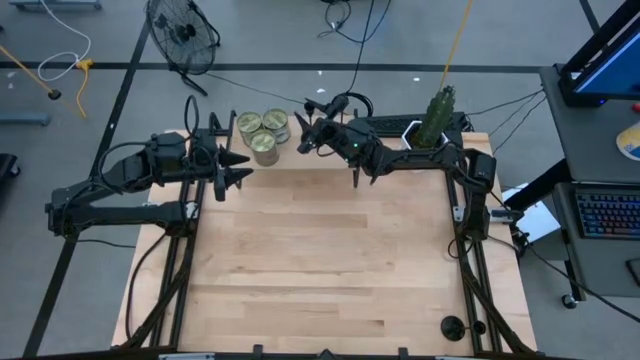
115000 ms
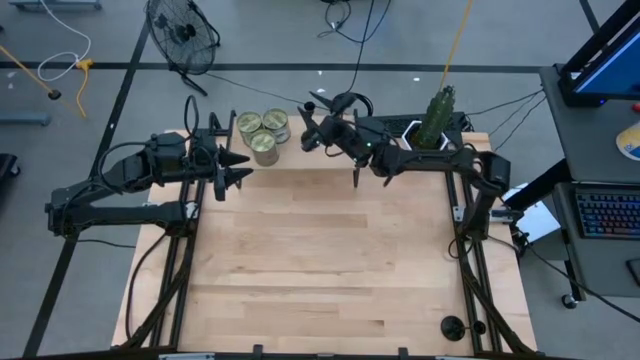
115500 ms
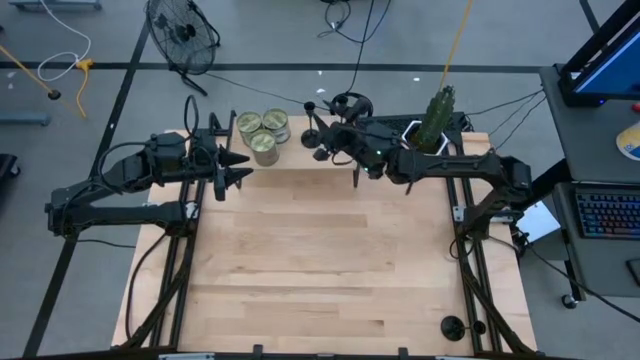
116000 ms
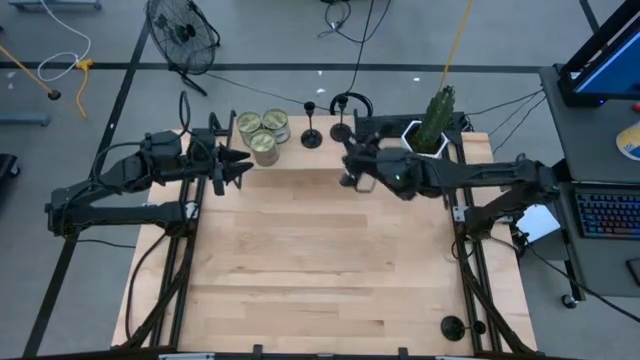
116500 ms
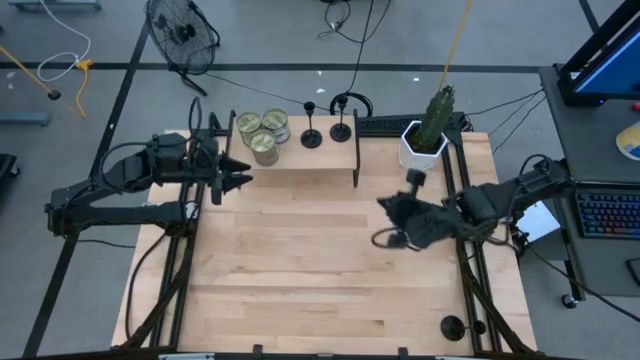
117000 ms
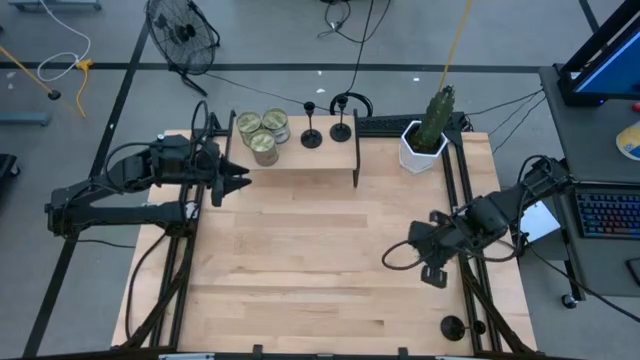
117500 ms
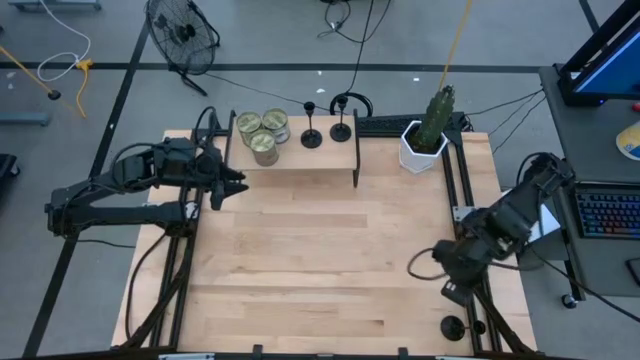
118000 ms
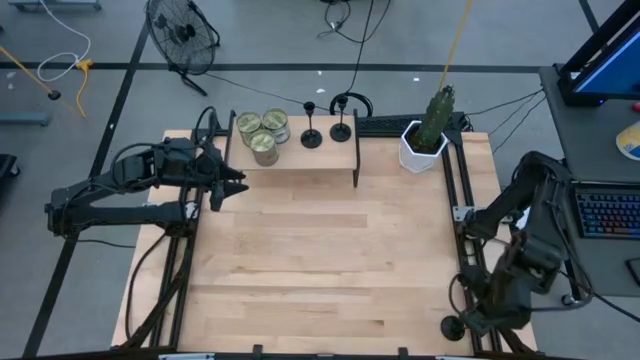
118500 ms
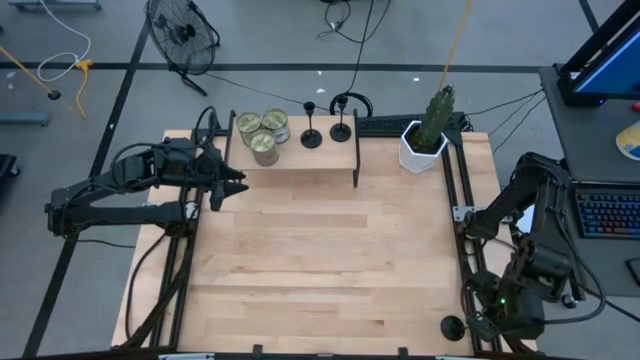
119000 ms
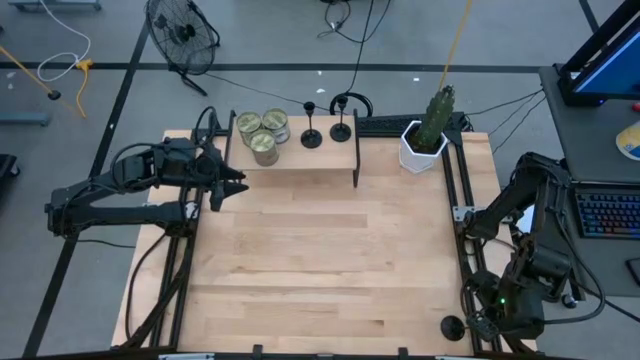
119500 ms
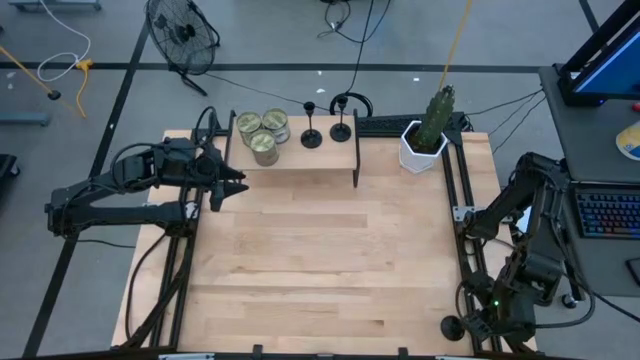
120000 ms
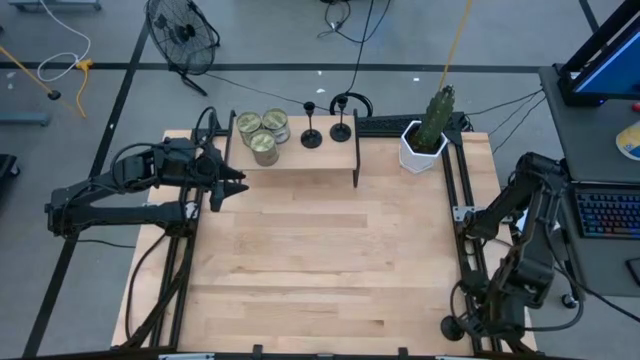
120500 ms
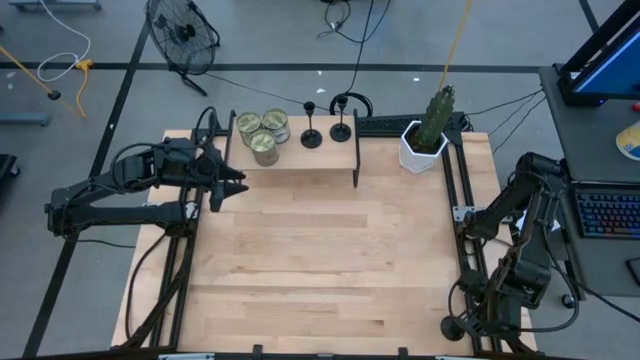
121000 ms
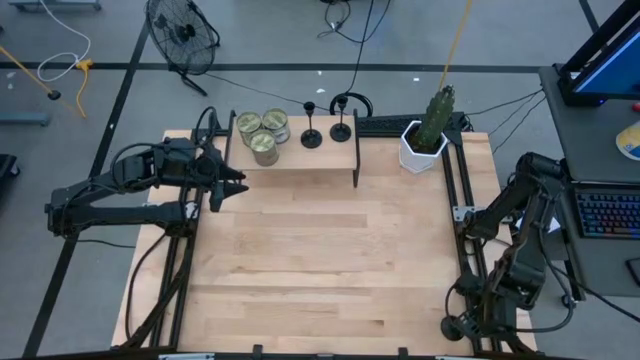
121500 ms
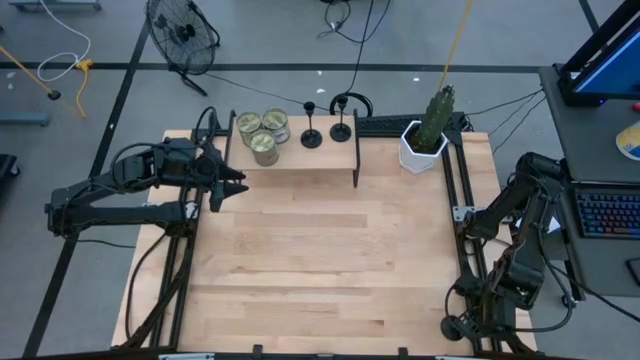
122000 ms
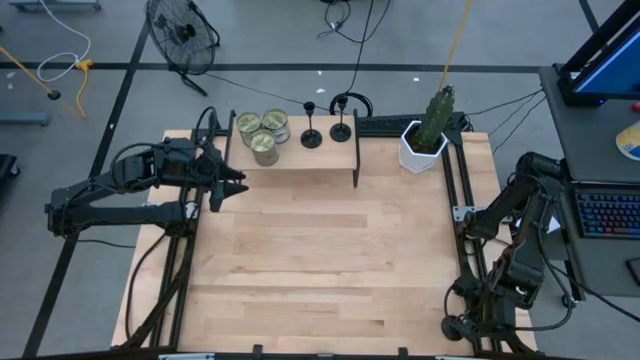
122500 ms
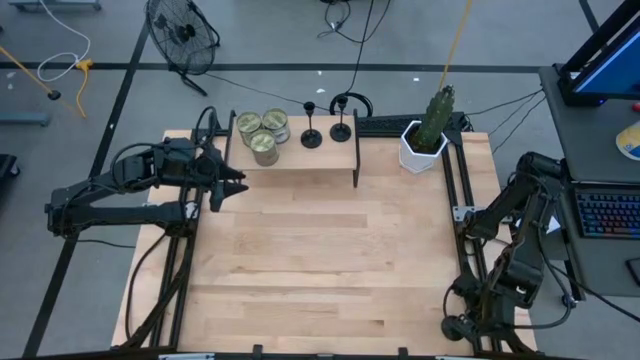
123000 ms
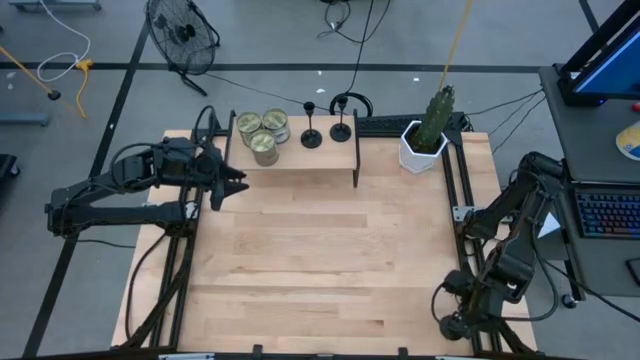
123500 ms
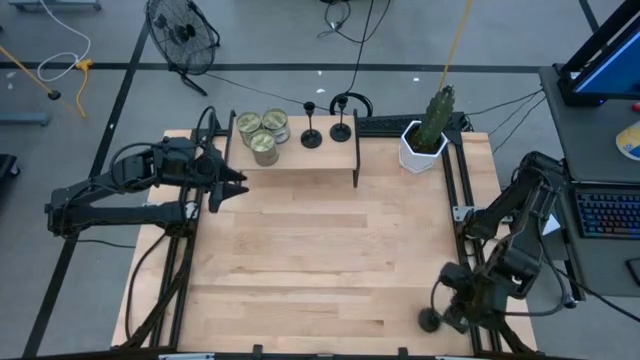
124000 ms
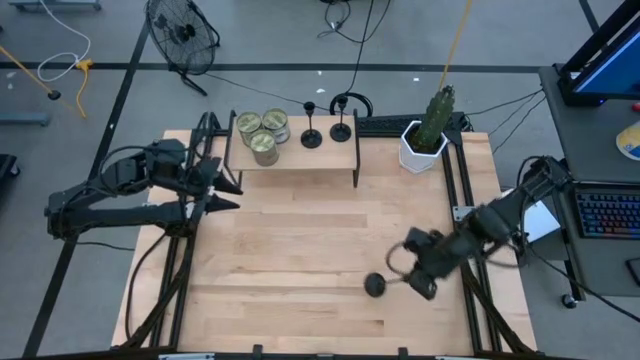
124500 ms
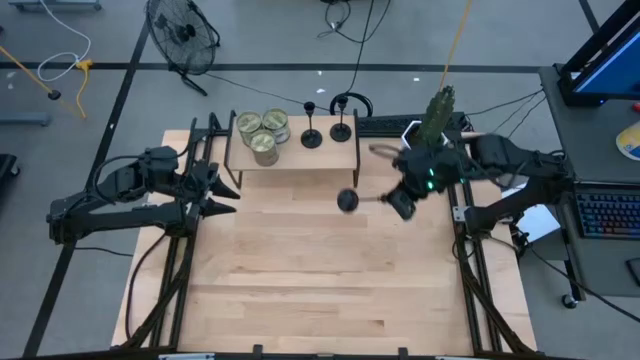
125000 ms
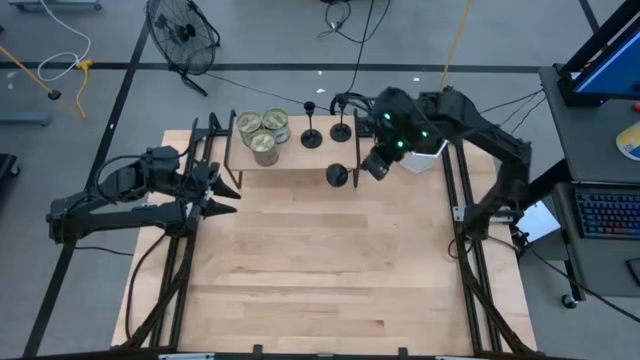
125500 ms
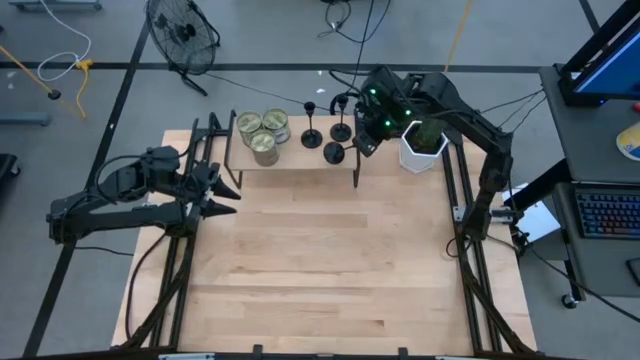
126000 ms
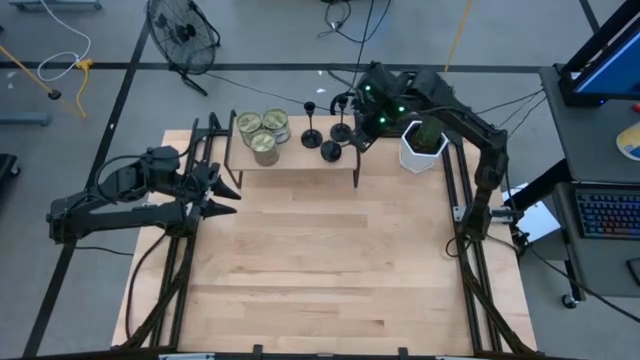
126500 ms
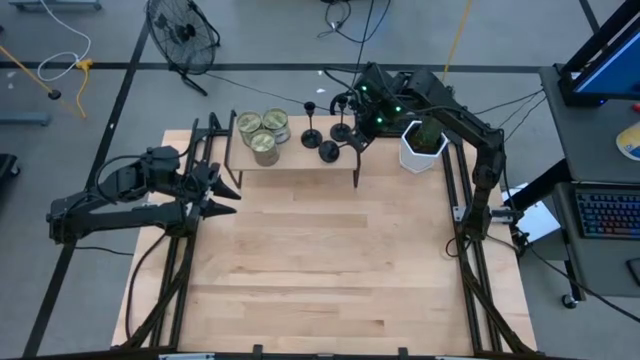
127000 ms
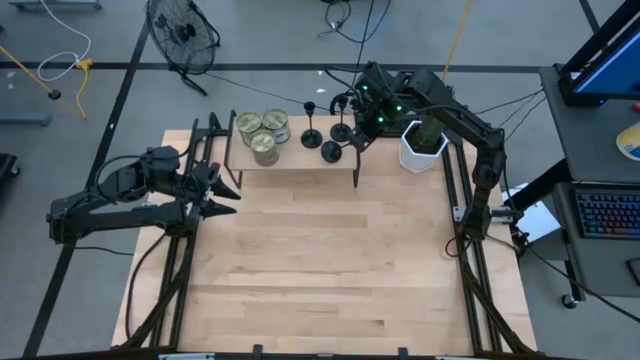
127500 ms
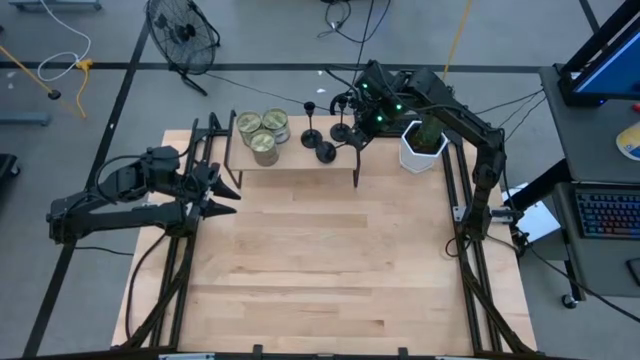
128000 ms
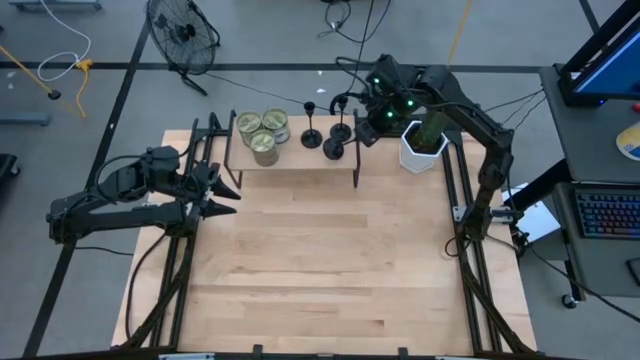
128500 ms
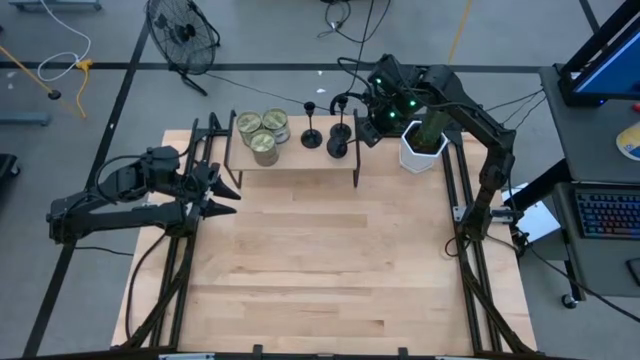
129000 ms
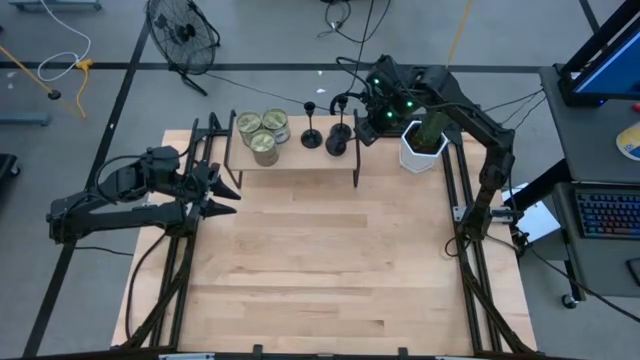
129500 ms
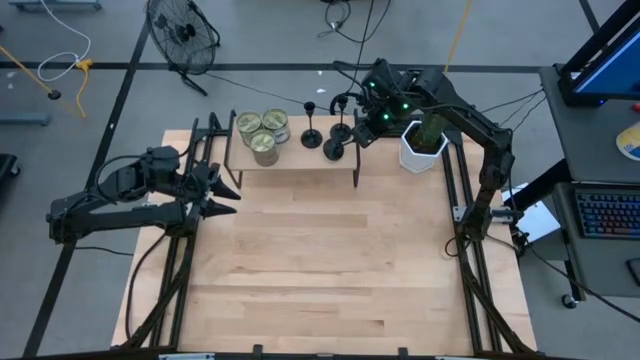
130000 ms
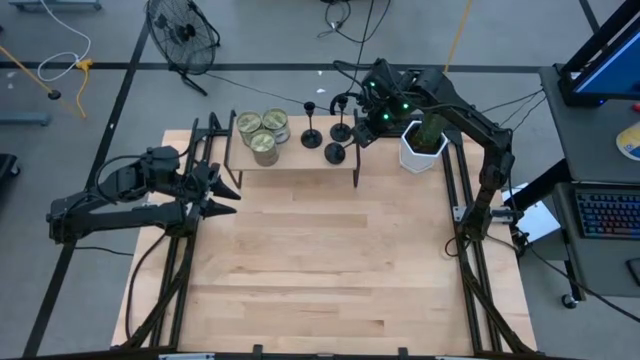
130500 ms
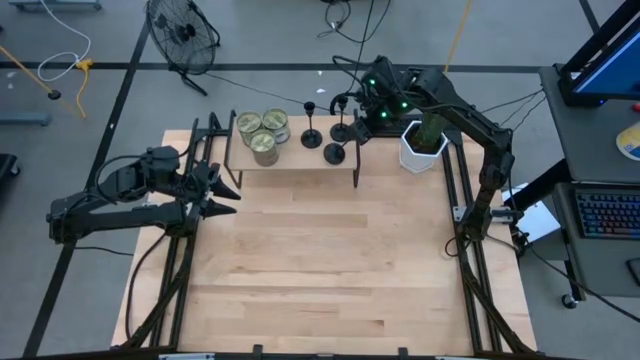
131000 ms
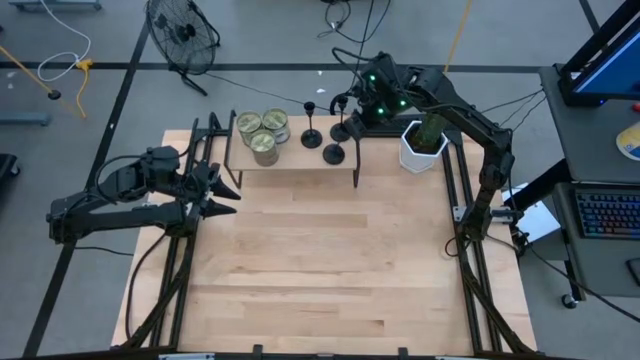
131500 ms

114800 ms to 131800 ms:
Task: Pick & Place candle stick holders
Put the black candle holder on the shelf

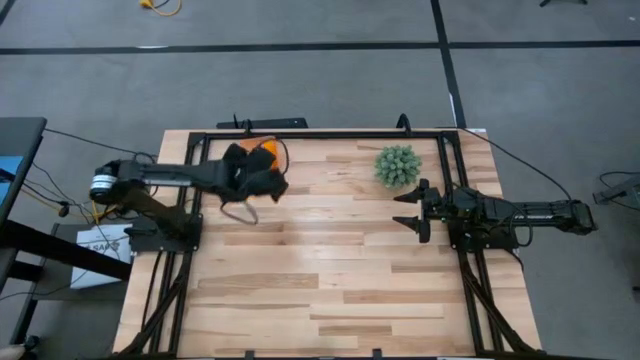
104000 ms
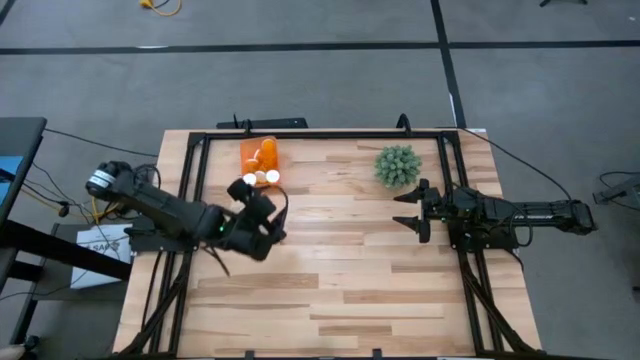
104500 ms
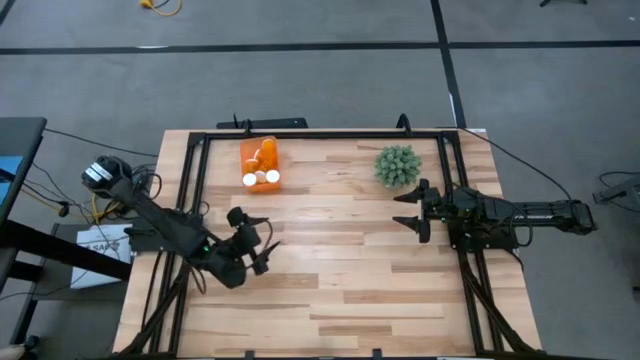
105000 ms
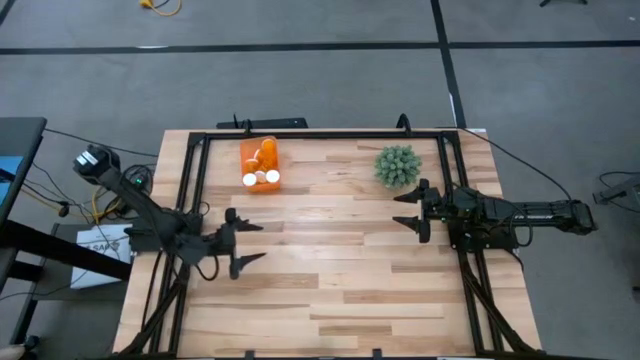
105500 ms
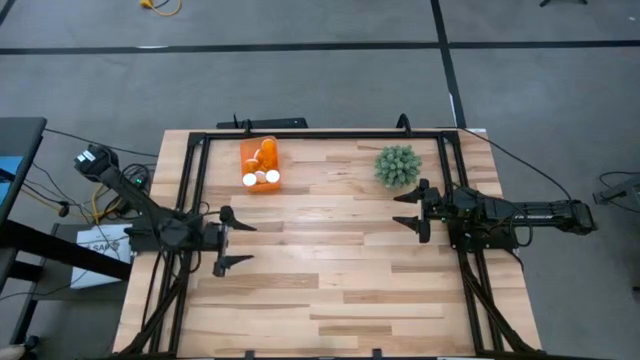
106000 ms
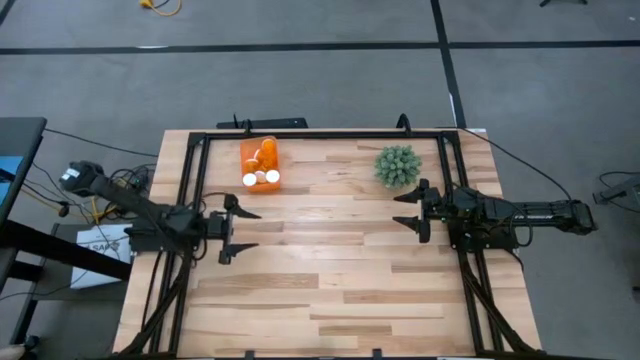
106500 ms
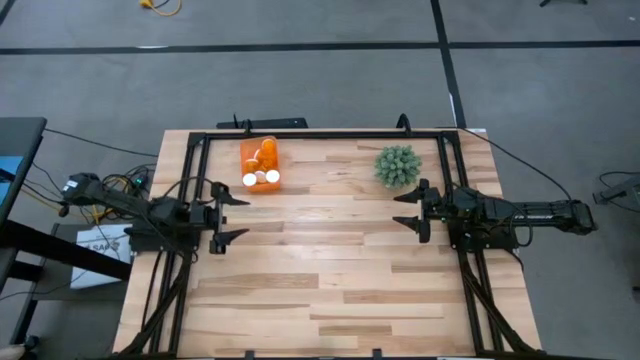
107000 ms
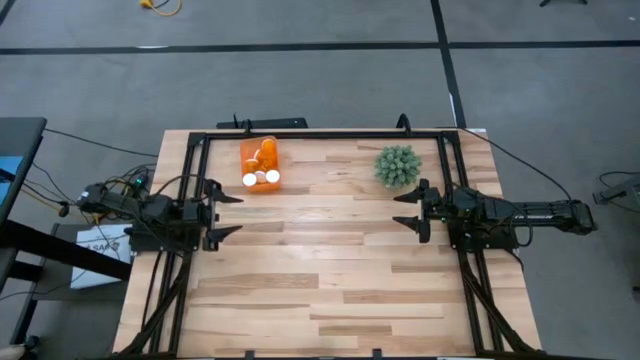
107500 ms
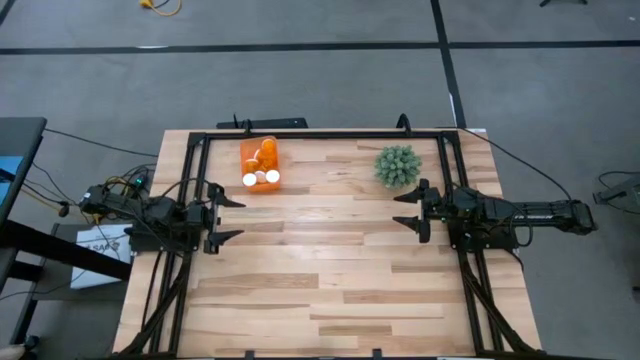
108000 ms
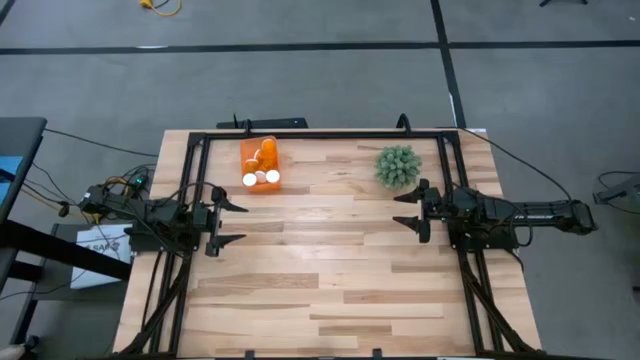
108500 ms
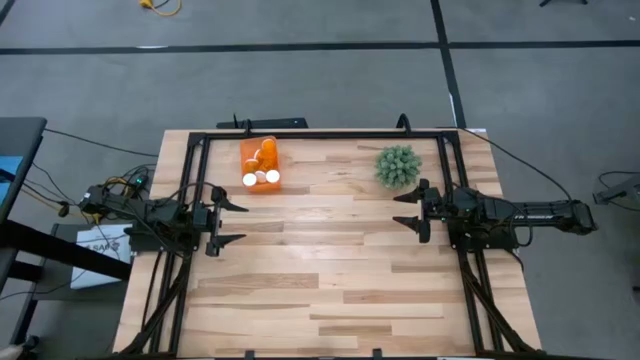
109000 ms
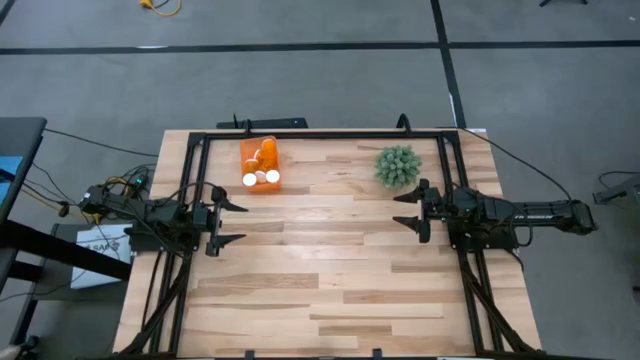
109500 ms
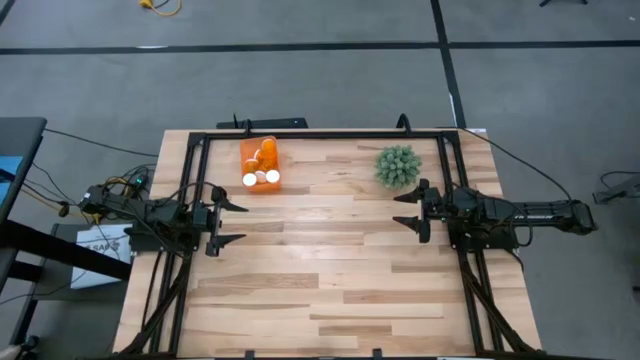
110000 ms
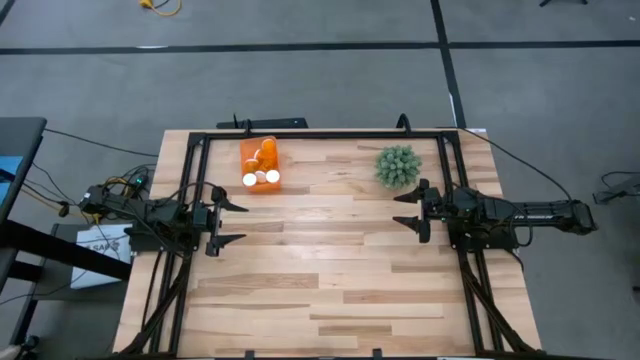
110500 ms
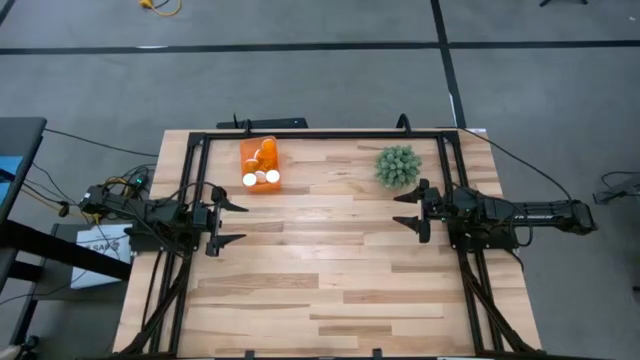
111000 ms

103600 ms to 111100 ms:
Task: Pick and place pill bottles into a basket
Return to Home Position
